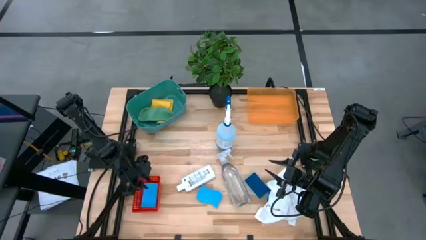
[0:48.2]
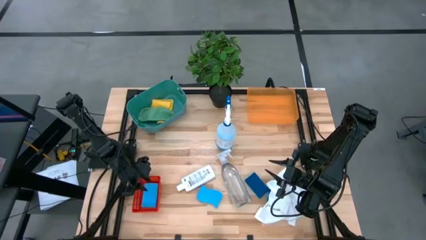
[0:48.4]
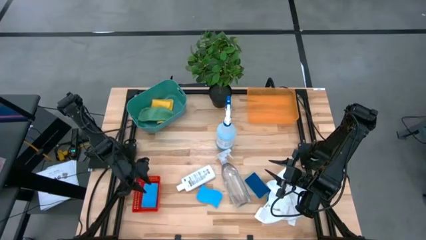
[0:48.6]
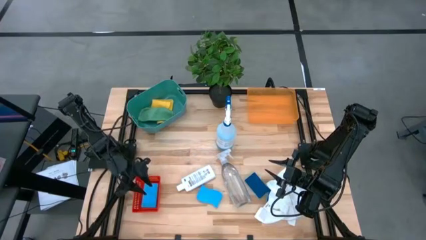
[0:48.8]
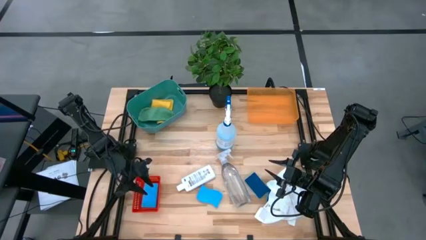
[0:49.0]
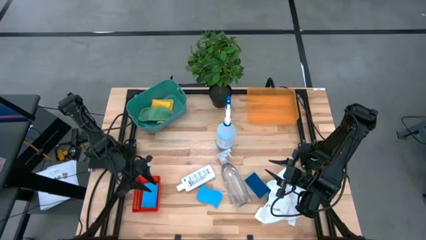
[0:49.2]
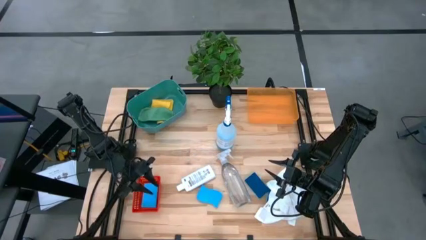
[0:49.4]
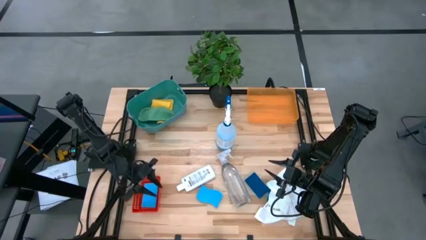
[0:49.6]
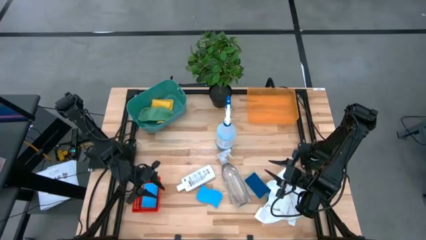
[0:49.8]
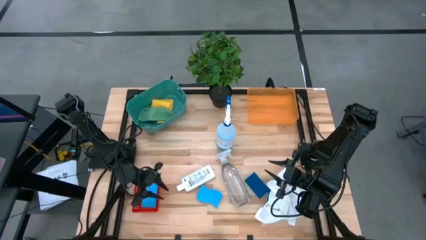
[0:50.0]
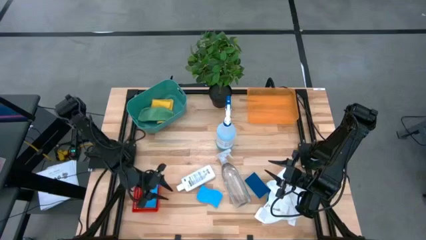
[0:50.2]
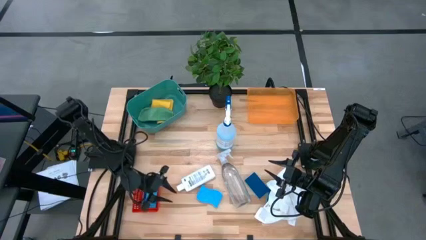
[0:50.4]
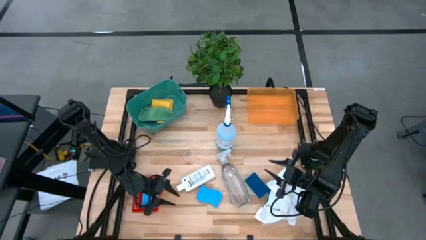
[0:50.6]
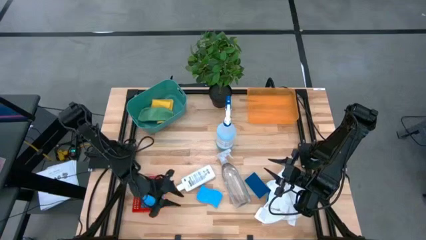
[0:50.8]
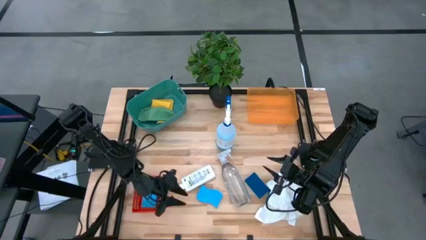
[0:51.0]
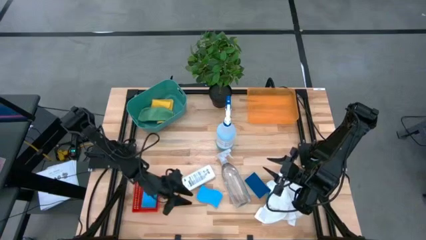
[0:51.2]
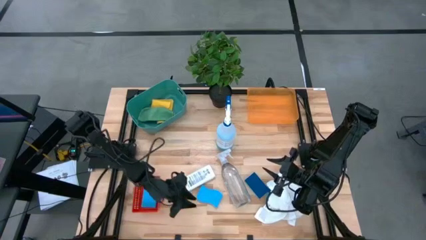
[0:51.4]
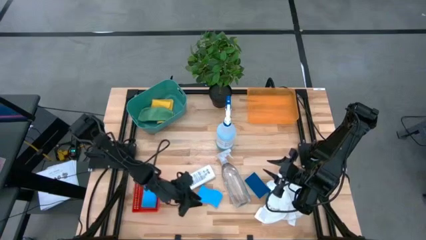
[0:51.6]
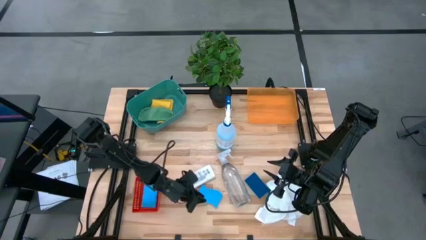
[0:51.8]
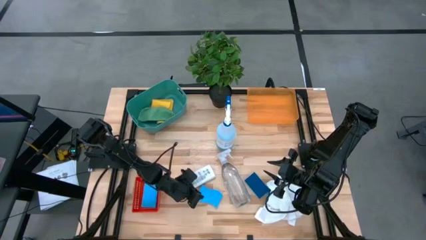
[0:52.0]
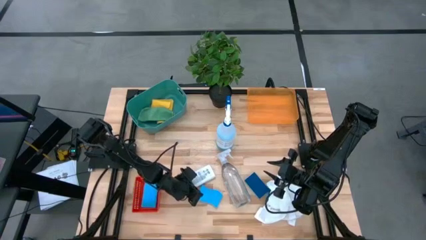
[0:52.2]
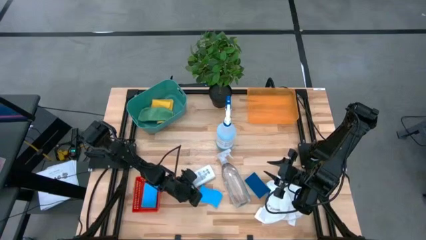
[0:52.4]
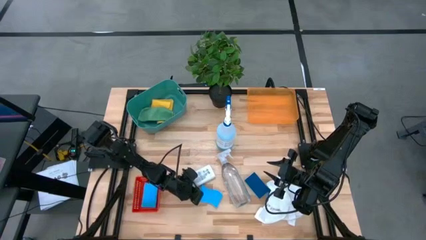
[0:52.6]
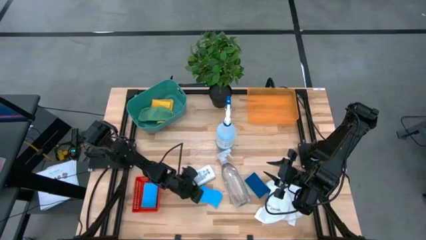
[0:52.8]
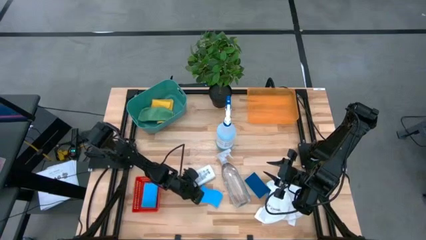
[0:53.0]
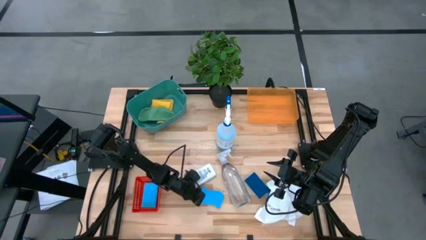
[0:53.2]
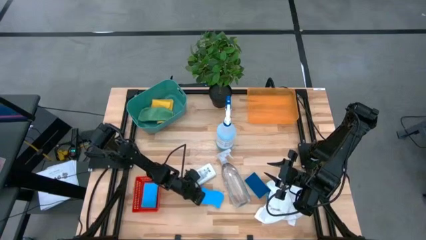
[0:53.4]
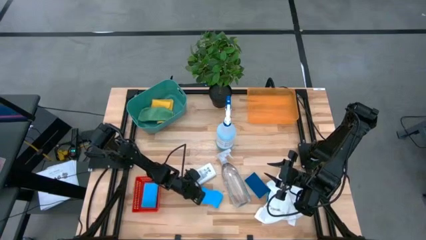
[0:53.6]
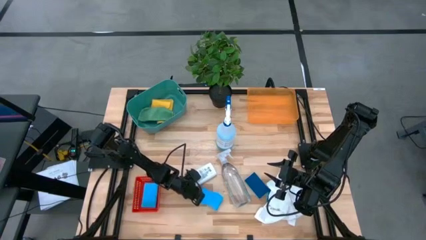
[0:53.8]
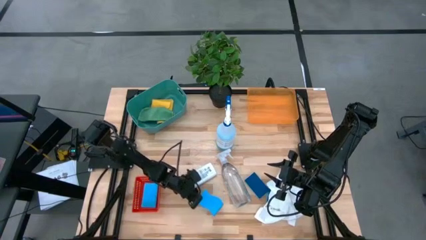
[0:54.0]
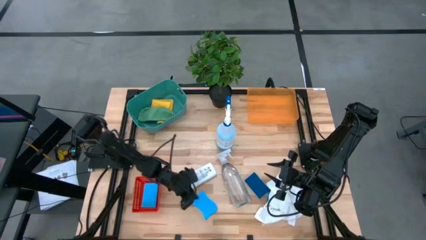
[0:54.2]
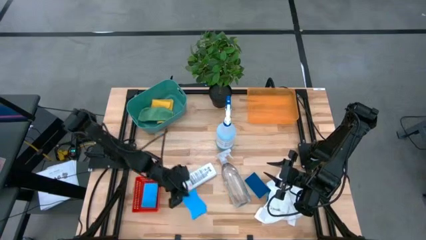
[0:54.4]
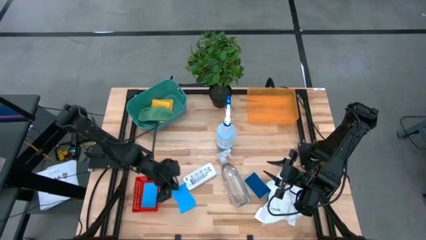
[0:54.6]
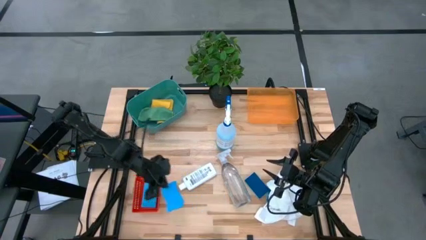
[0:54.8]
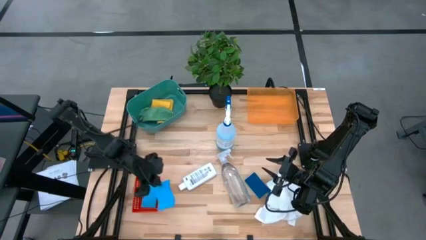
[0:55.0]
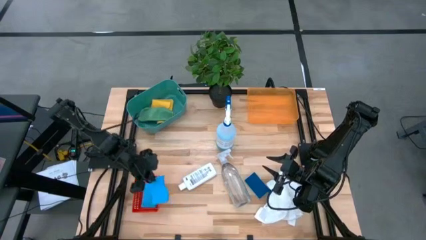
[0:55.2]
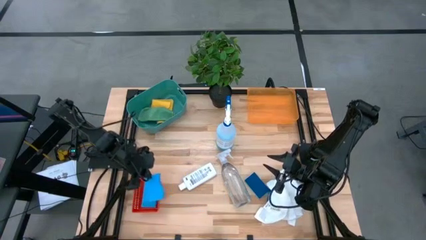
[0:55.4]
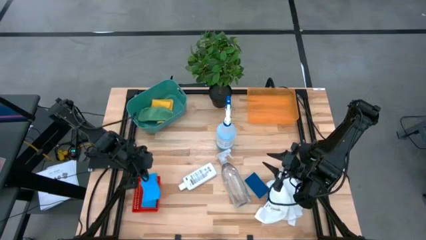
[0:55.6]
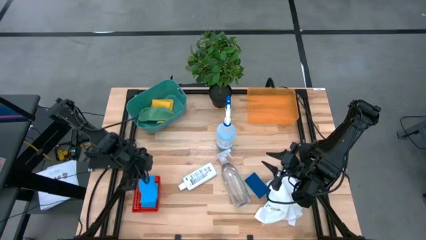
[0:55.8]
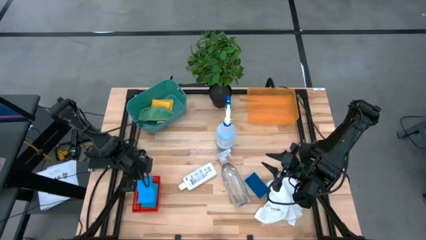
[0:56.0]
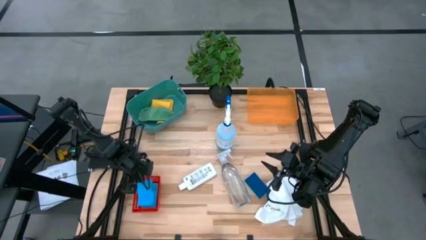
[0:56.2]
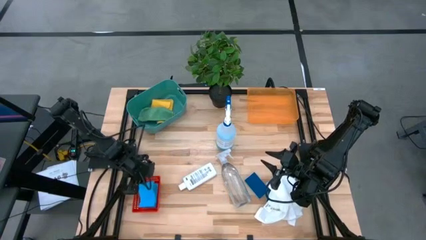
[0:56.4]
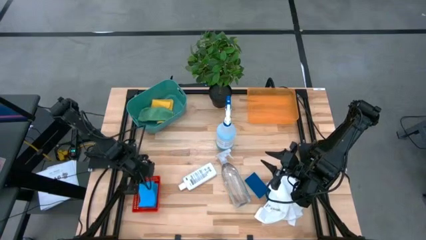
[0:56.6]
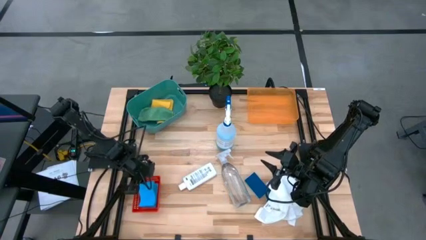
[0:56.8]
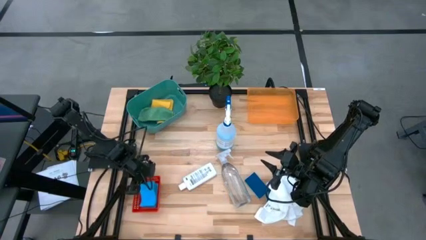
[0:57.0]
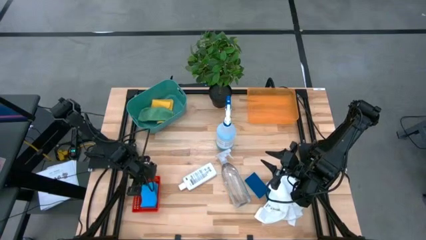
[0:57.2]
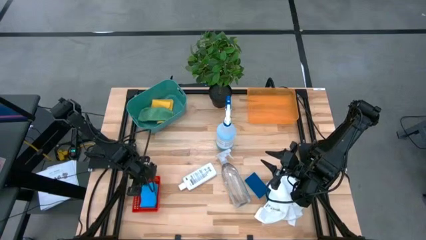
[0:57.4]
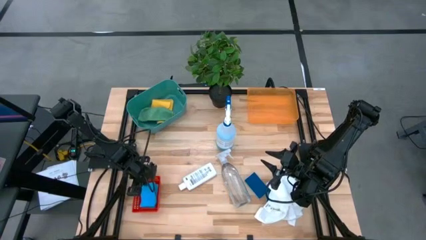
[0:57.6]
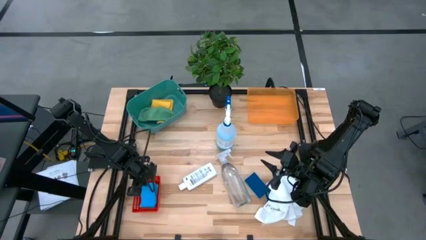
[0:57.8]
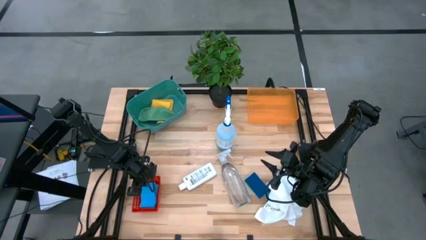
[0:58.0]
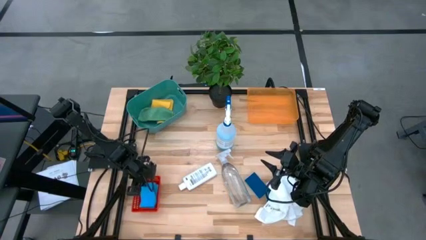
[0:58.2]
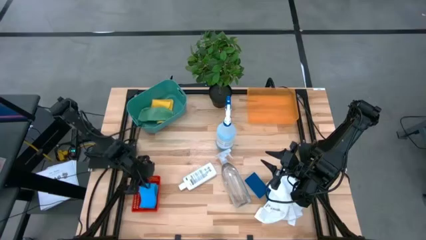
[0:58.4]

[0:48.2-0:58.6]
Task: Pick & Place Kitchen Items
Put the blue sponge into the red bin

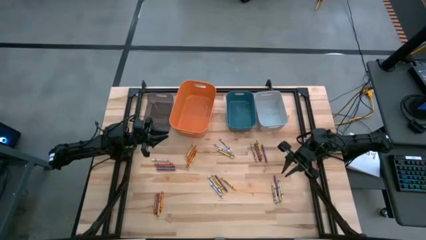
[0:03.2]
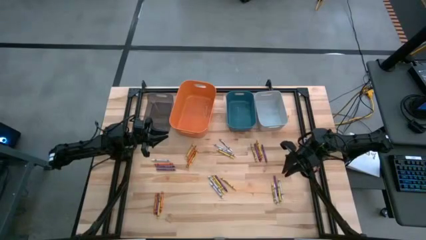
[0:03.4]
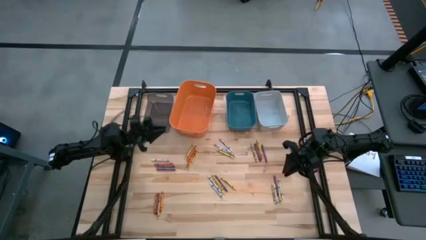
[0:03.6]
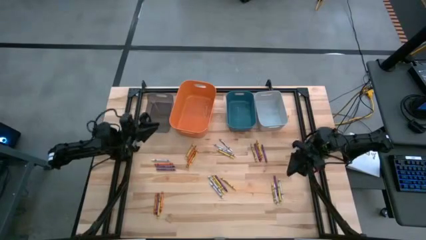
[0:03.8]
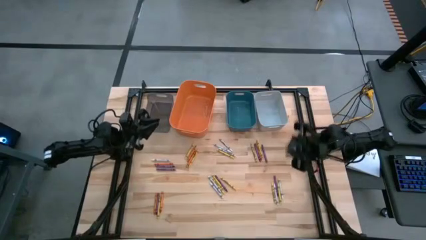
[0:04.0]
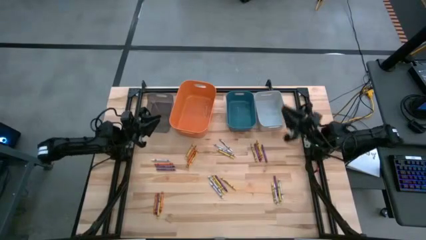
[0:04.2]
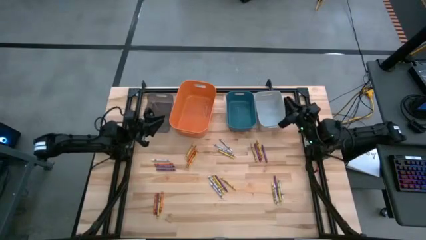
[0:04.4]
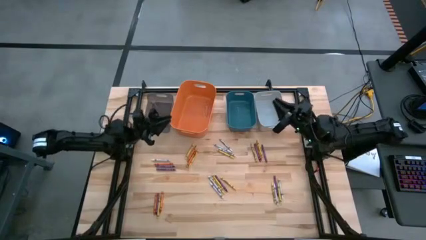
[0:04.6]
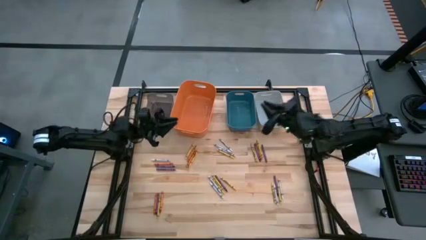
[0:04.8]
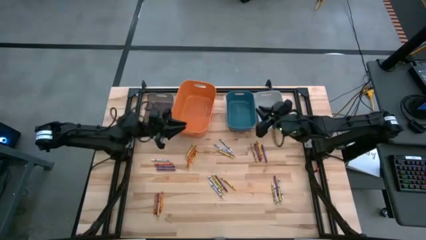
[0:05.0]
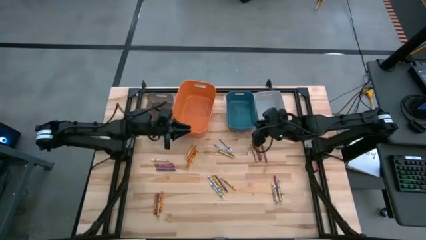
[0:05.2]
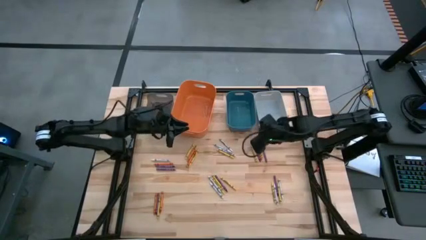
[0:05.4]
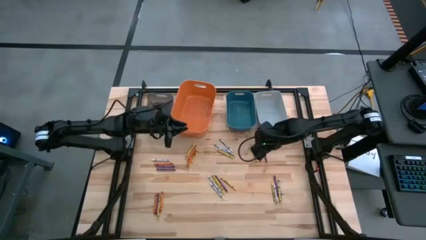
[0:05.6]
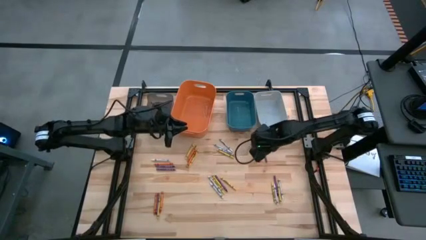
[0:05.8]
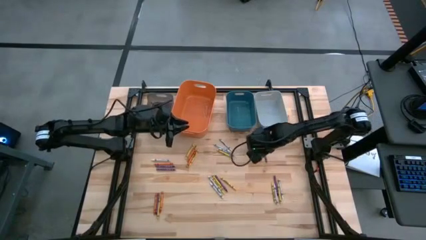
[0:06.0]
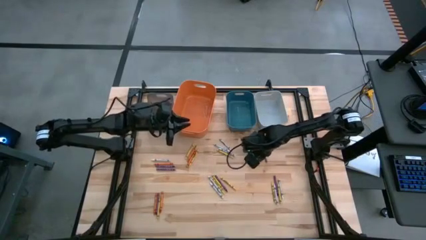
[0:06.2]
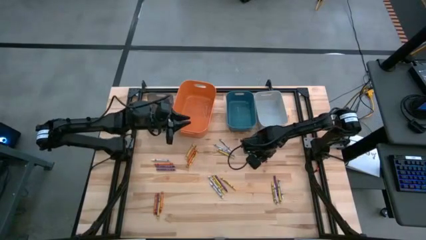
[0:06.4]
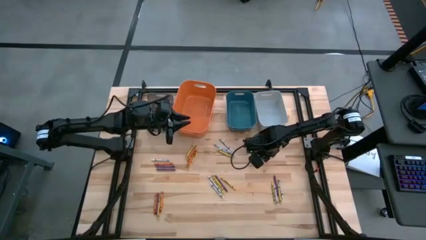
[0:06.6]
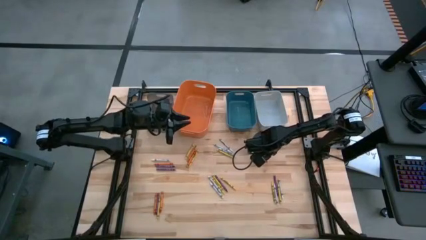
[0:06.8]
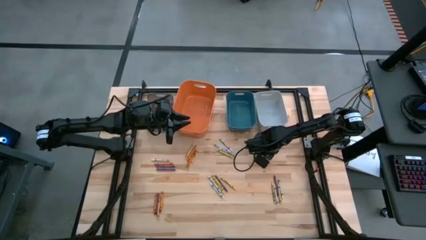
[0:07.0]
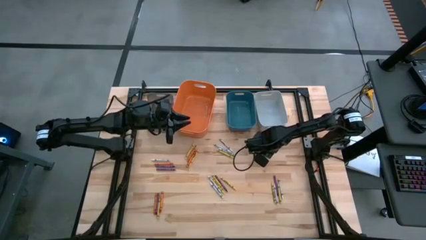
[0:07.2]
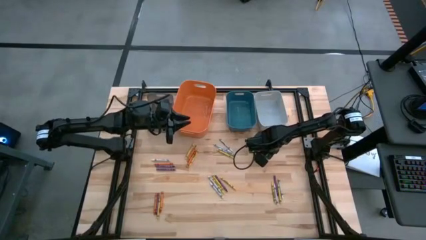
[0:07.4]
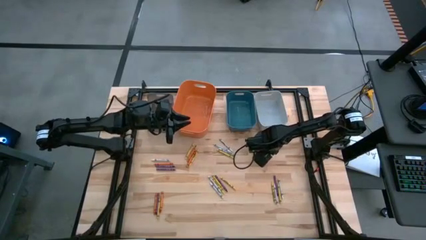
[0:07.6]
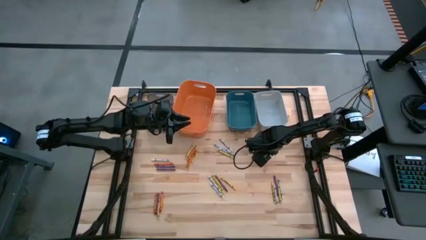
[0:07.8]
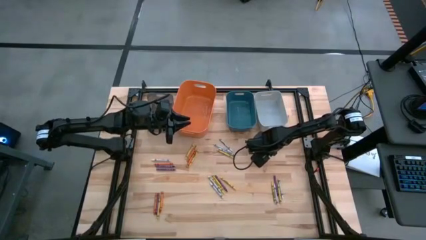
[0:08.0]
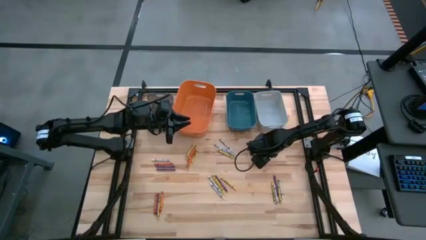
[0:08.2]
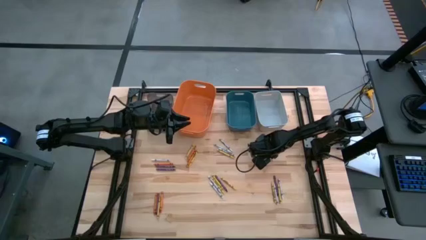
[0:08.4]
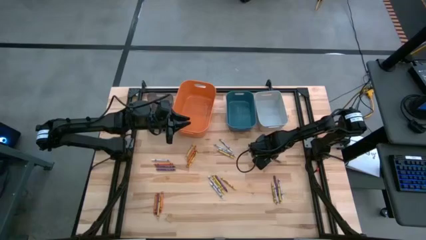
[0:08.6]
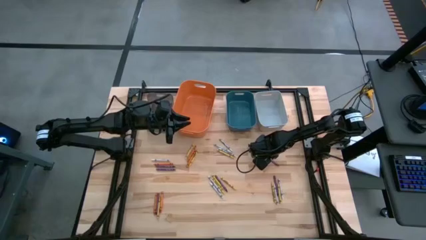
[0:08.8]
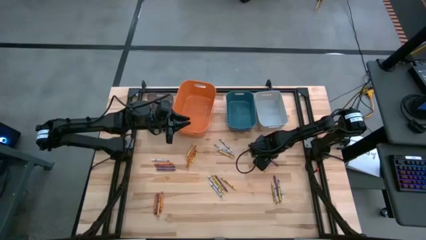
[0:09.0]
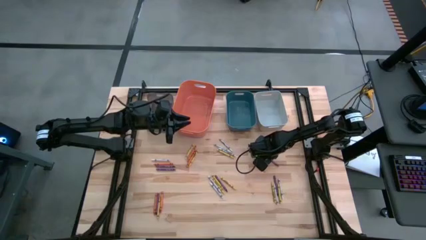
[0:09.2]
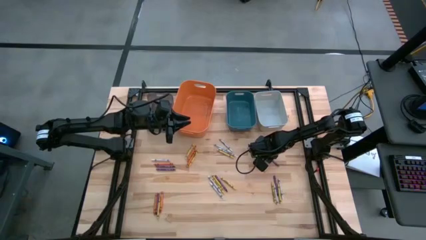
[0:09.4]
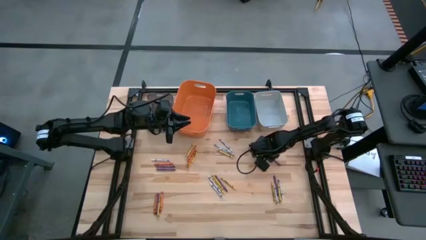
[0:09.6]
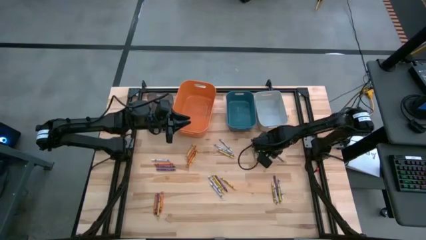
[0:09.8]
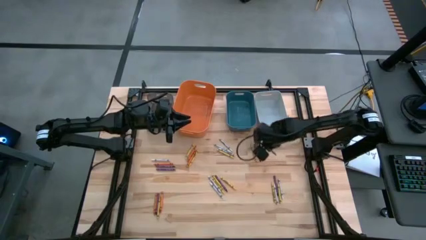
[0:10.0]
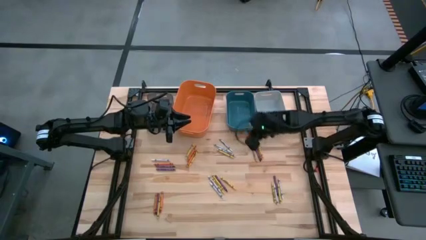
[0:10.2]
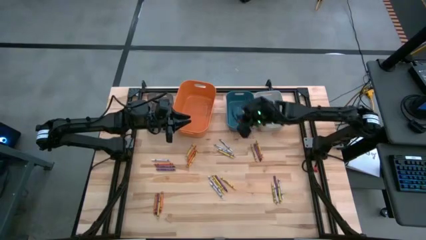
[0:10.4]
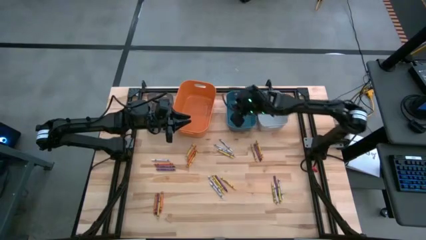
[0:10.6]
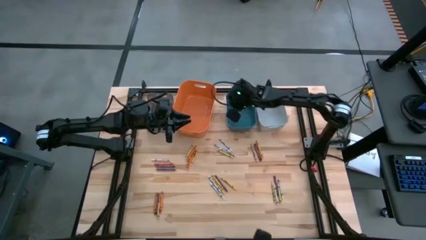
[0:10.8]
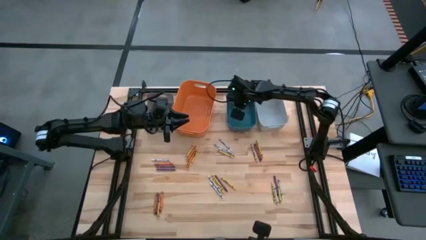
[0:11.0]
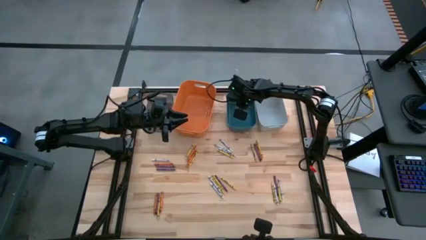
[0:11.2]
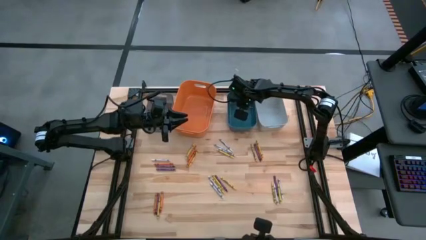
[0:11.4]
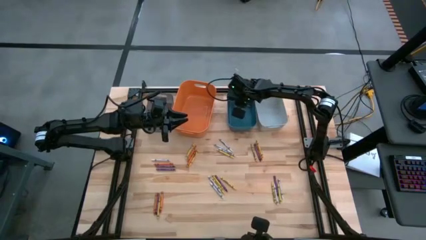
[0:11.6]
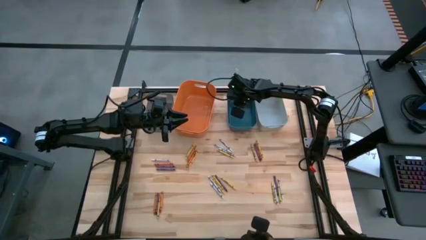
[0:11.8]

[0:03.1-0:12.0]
Task: Sort crayons
Put the purple crayon into the blue bin
